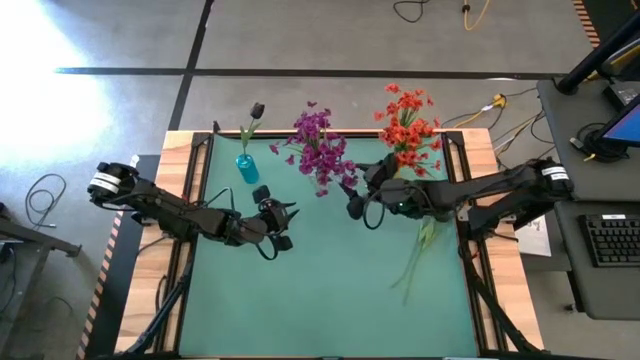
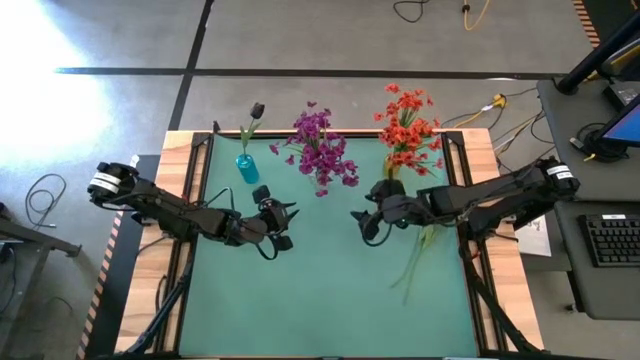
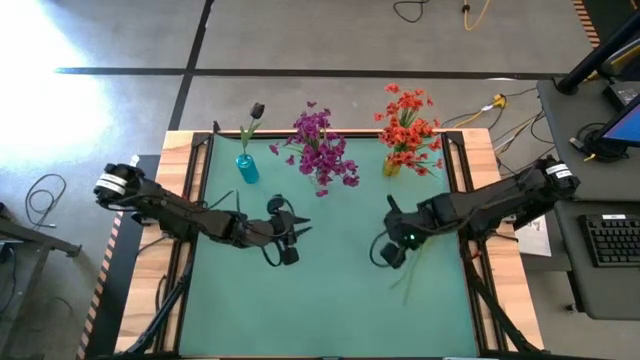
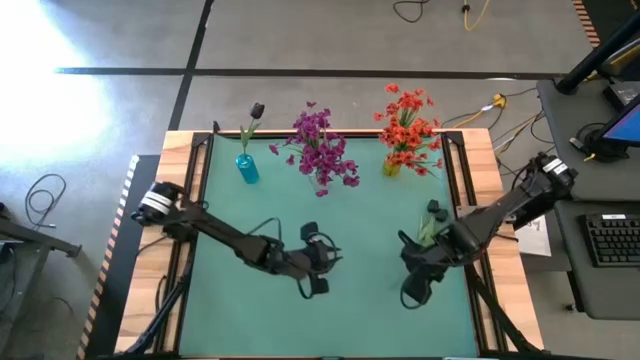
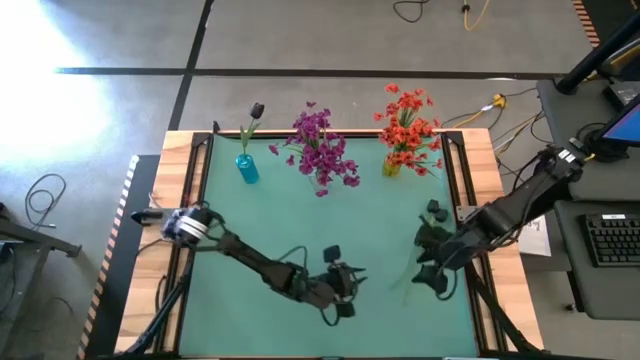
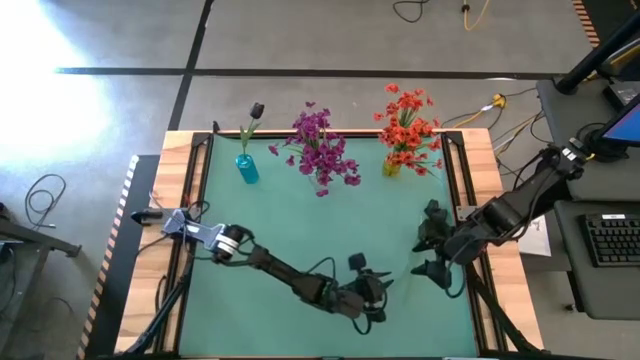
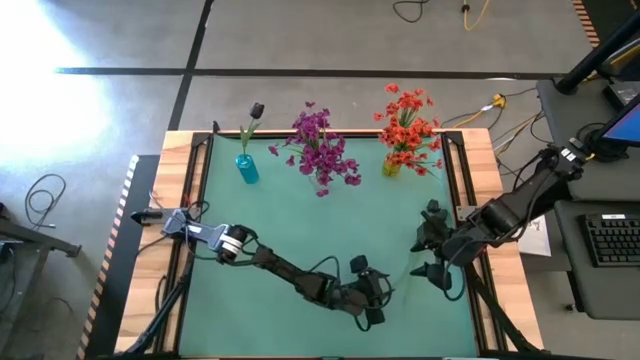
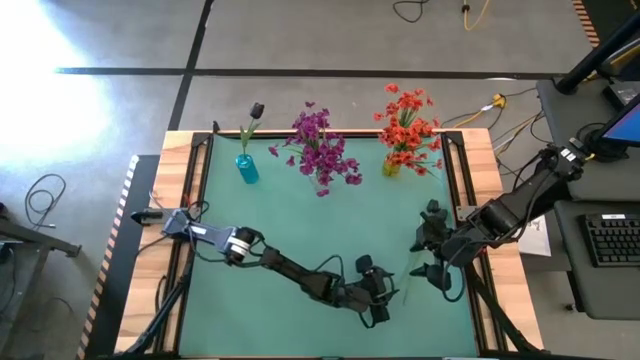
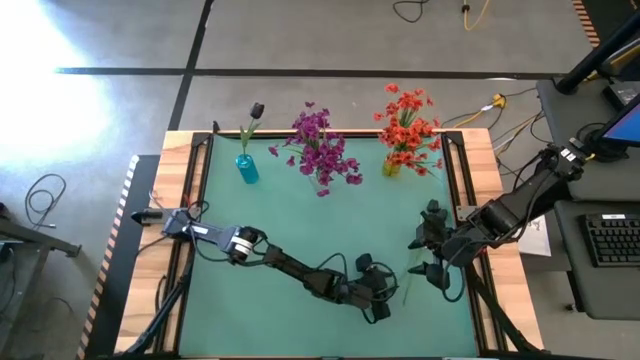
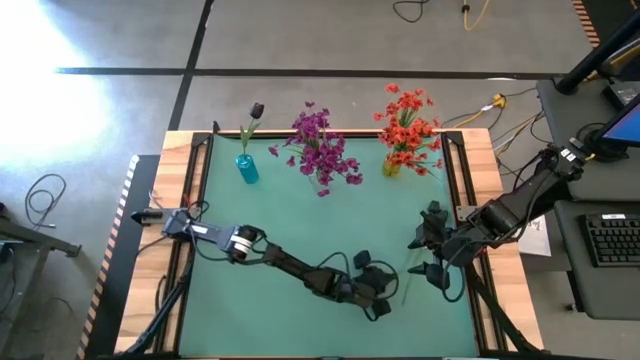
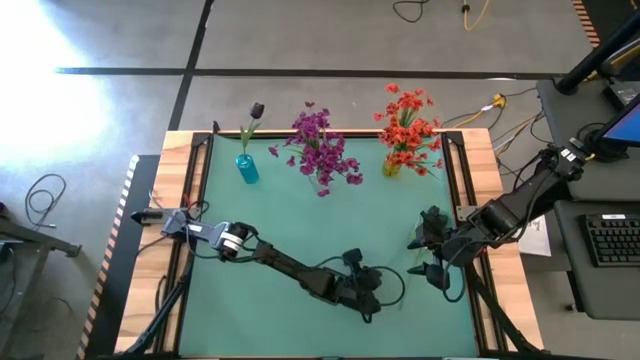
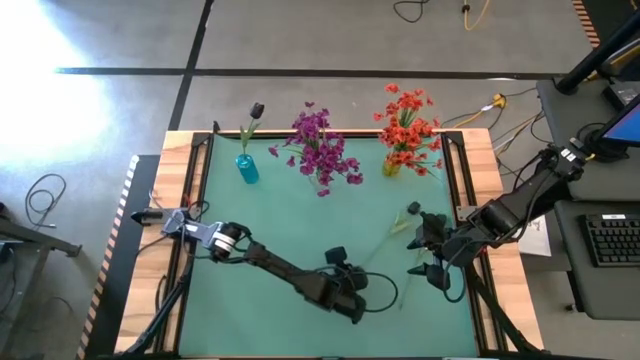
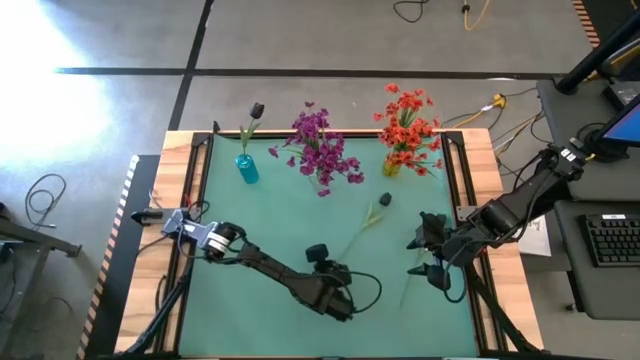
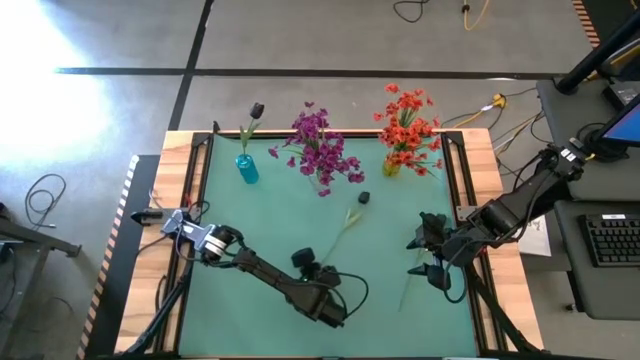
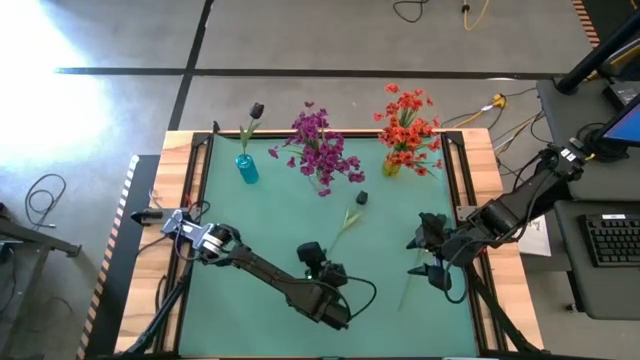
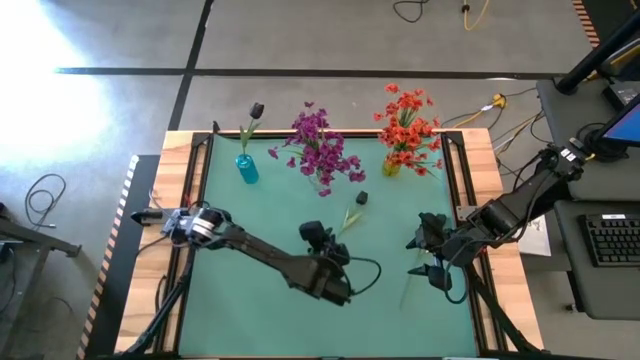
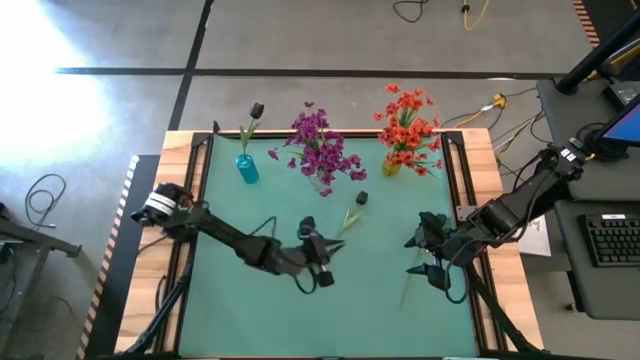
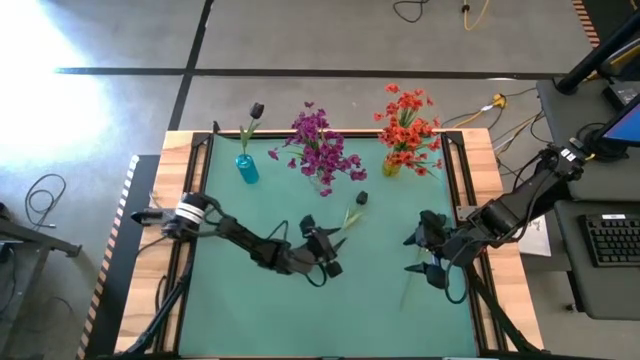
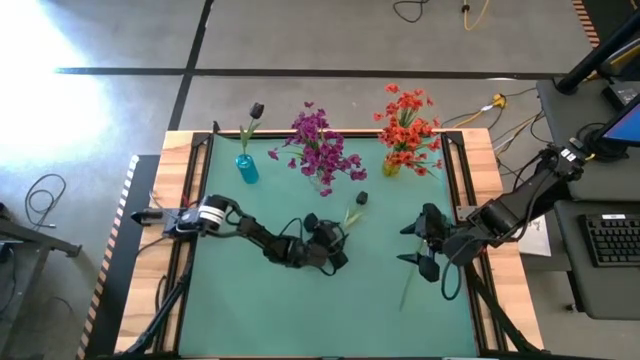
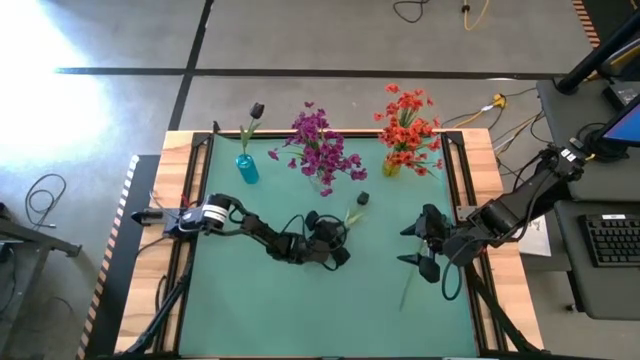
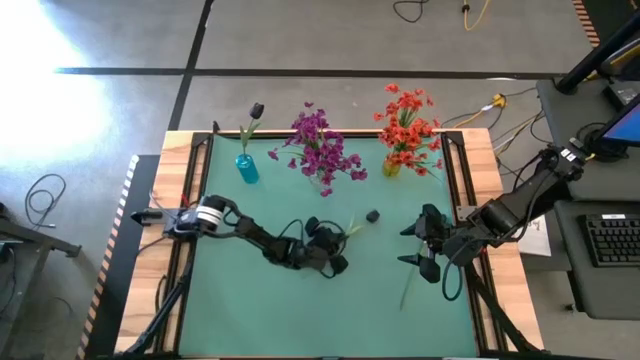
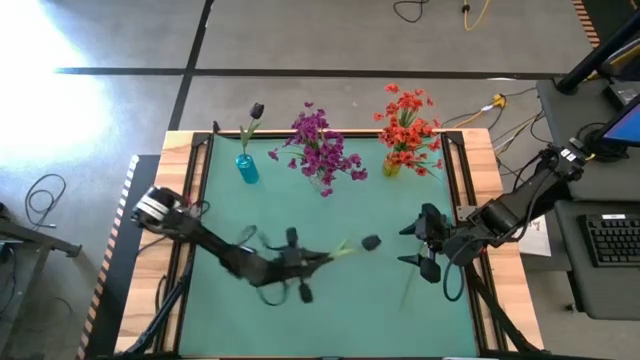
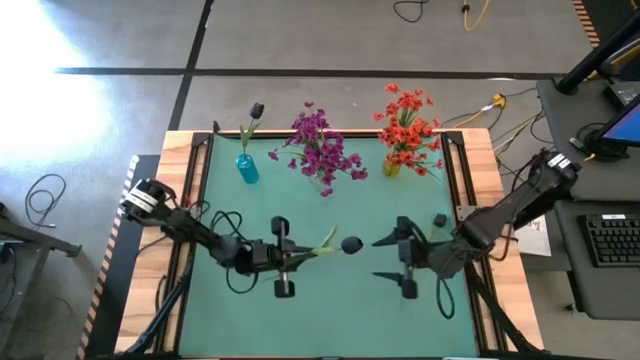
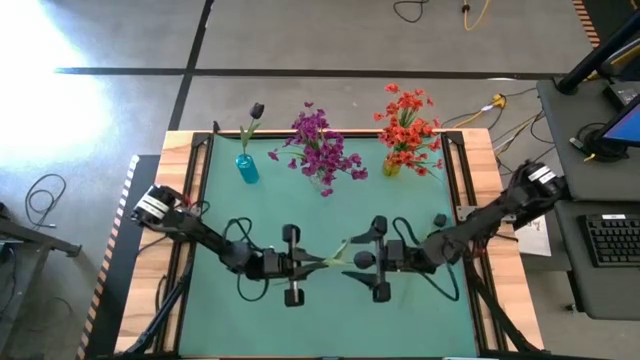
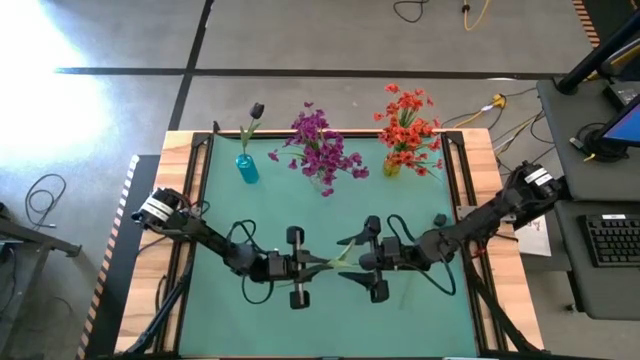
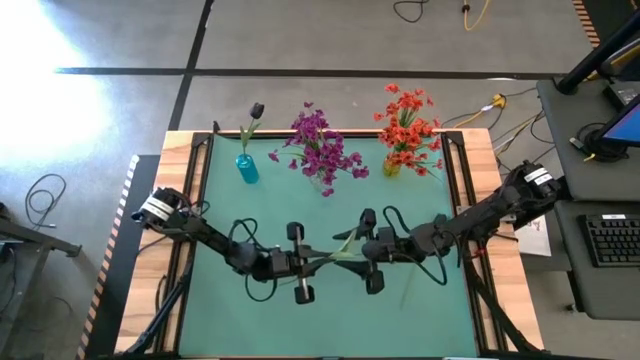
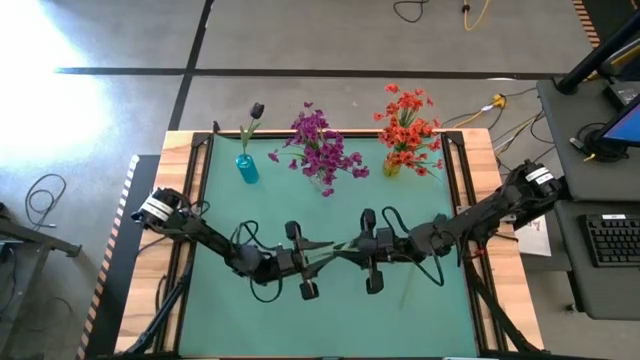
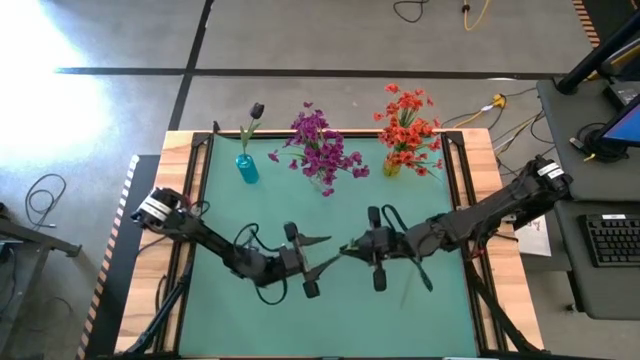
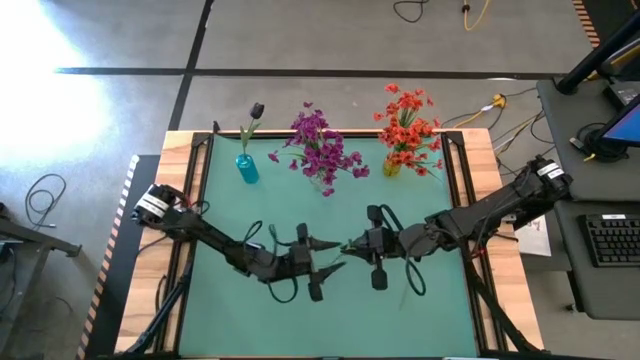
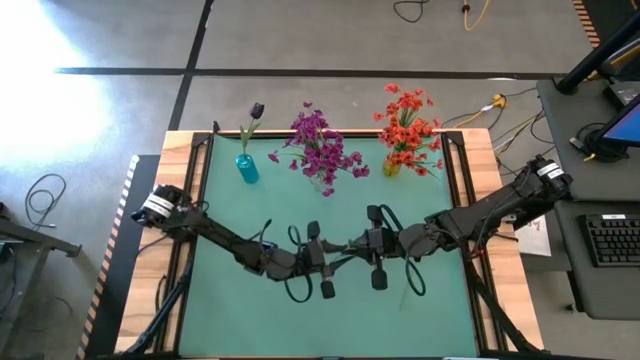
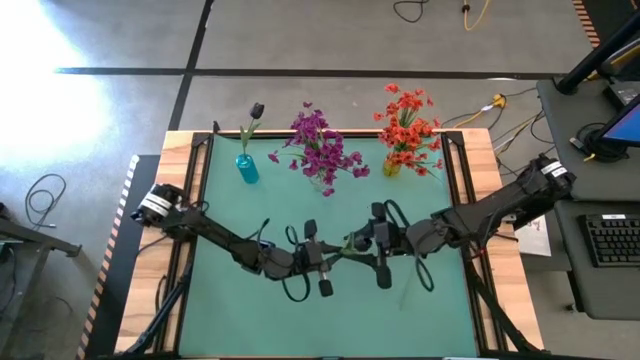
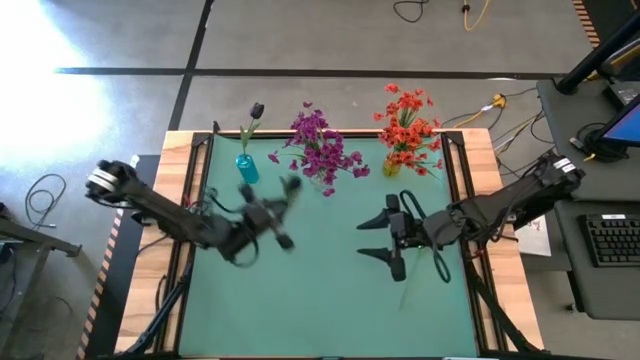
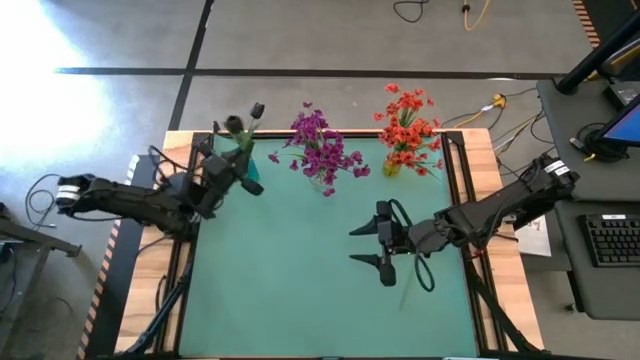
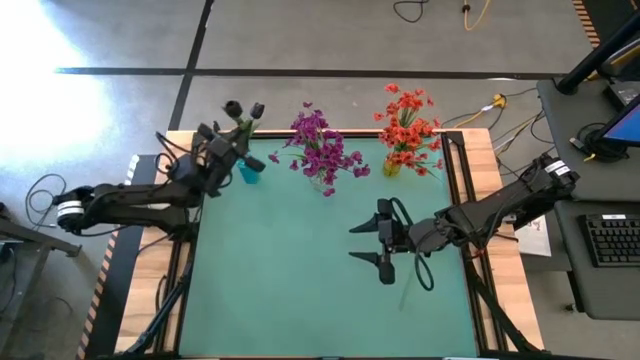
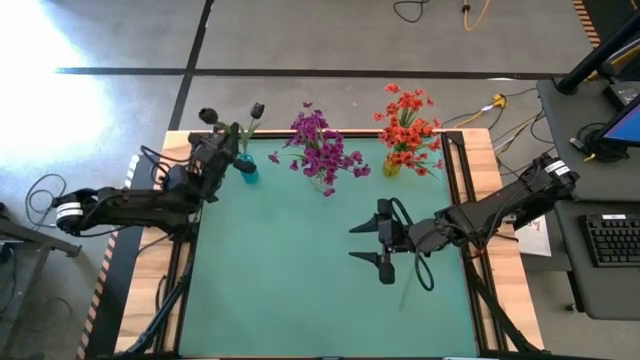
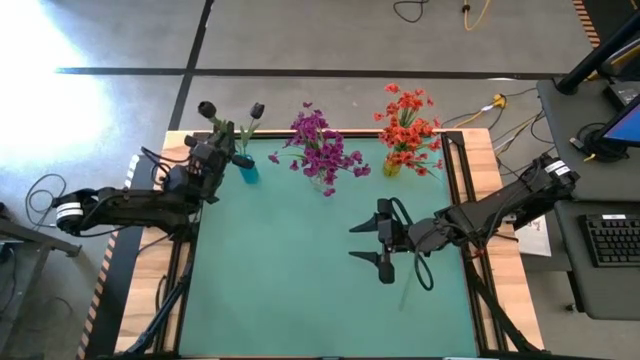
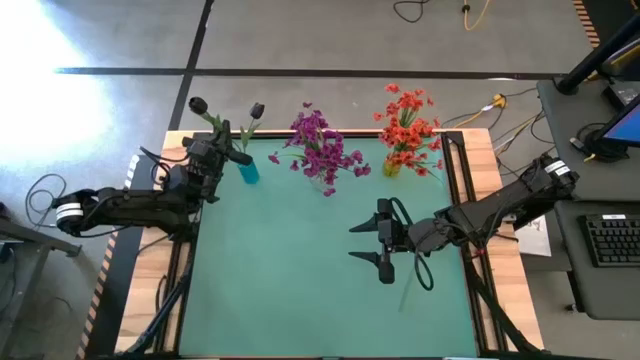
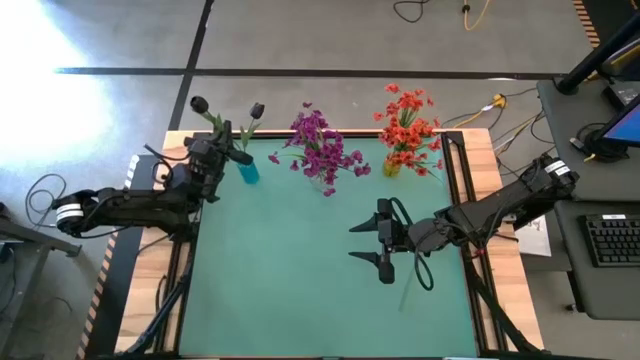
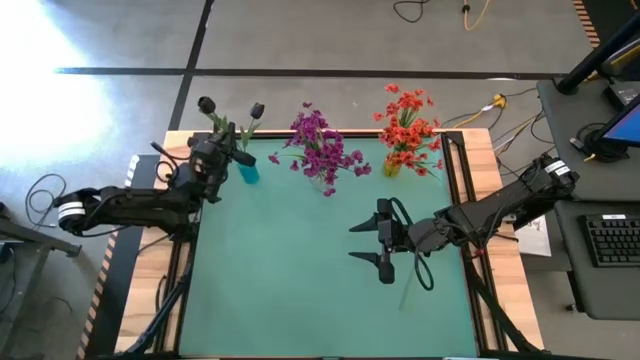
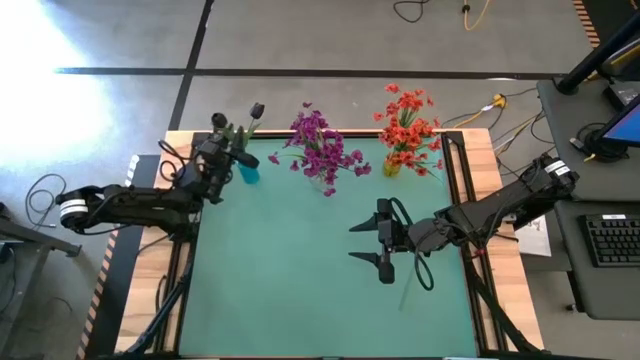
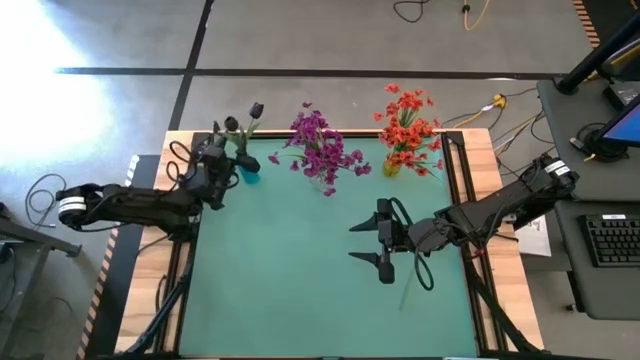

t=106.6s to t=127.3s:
Task: Sort flowers into vase by color
Put the left black flower into the blue flower vase

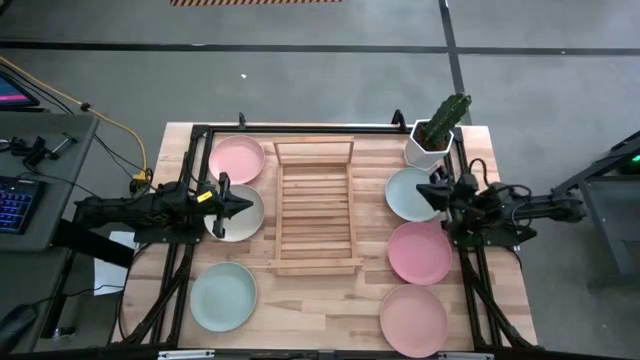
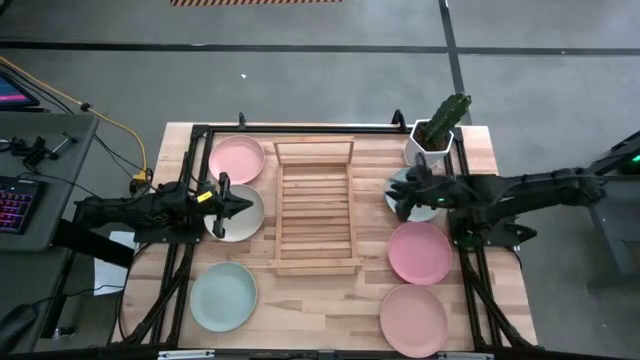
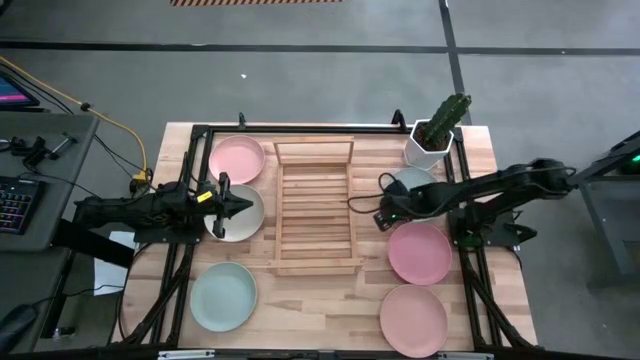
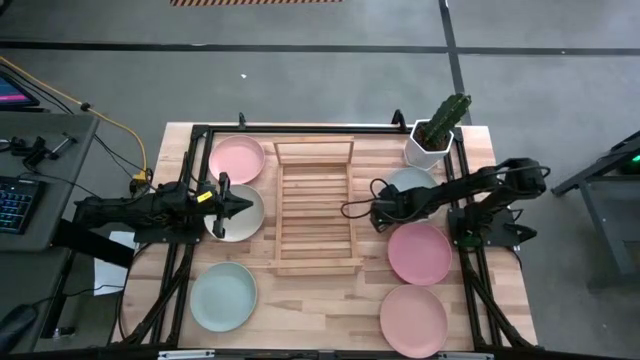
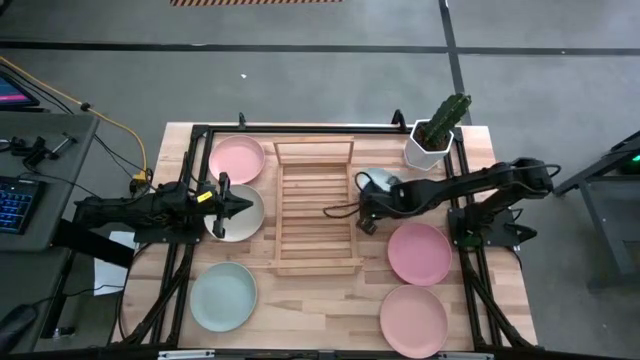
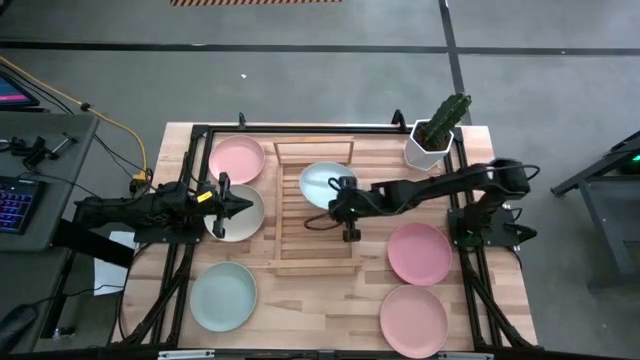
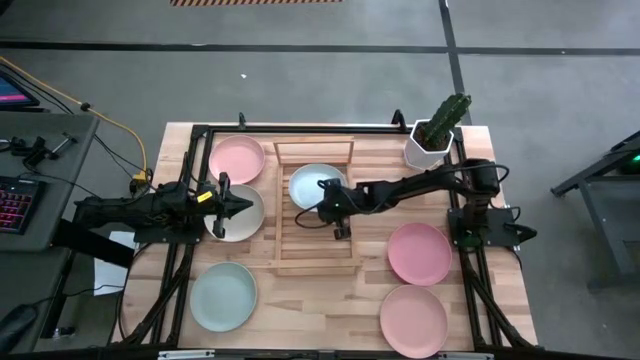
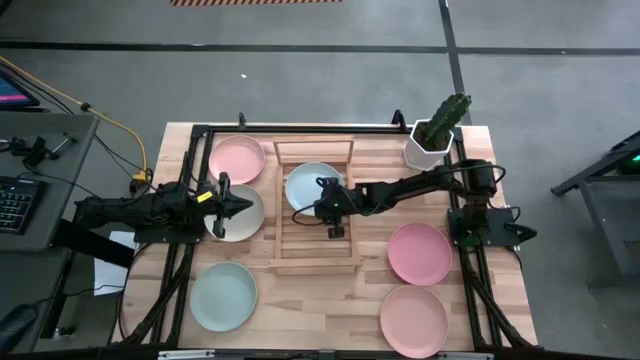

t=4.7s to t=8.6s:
Task: Place and stack plates onto a shelf
Put the top blue plate on the shelf
